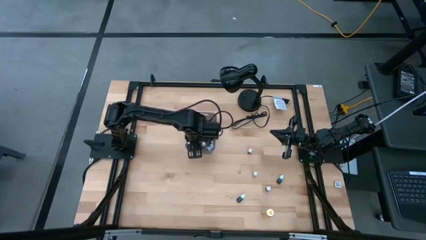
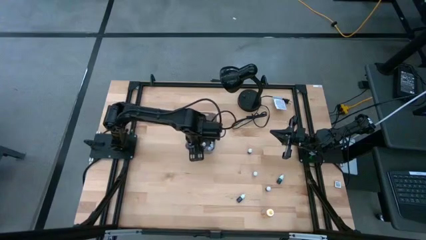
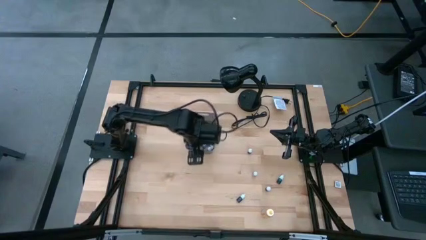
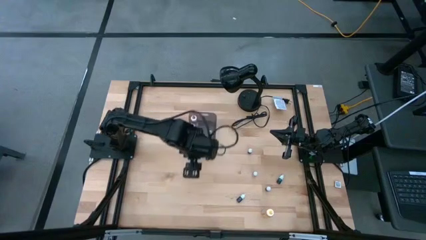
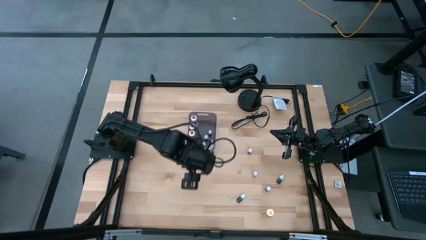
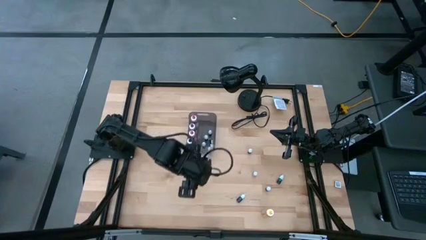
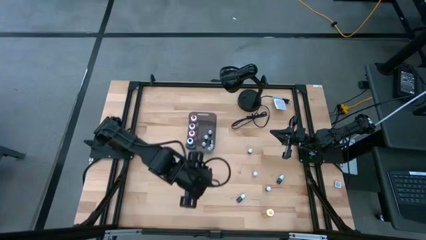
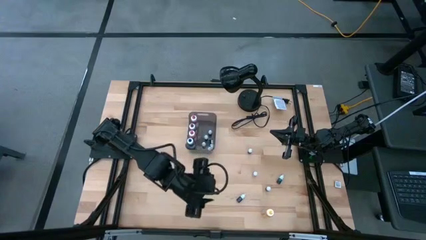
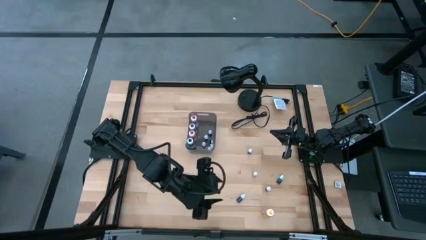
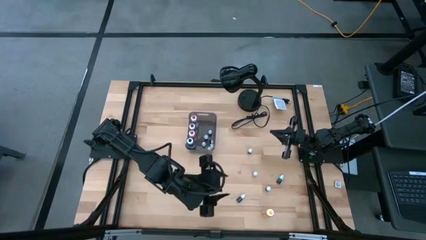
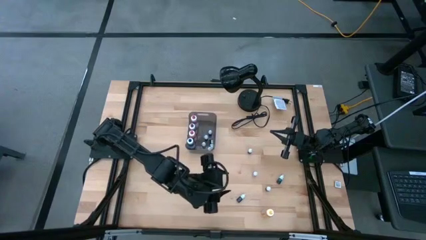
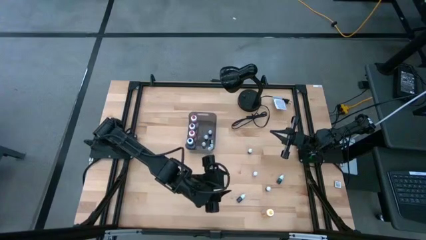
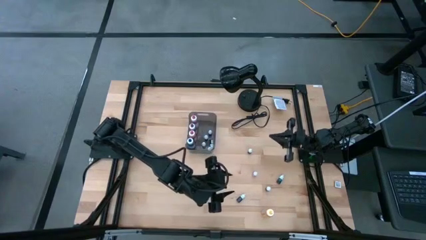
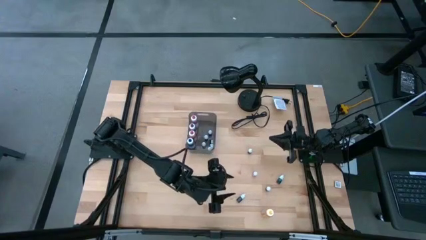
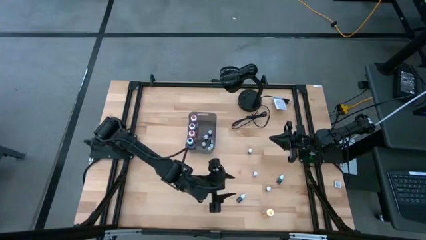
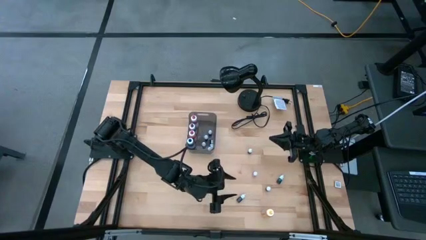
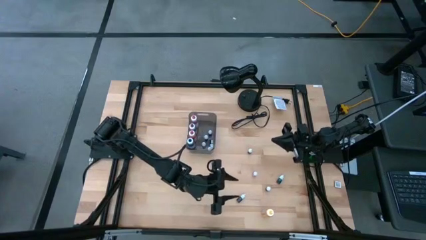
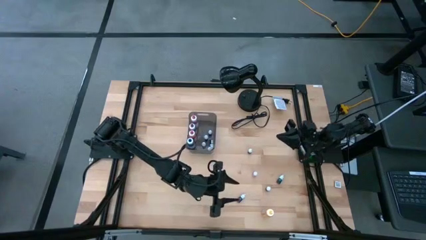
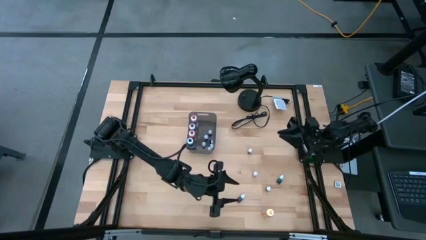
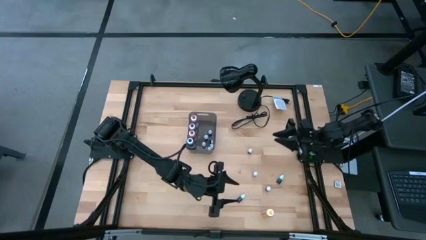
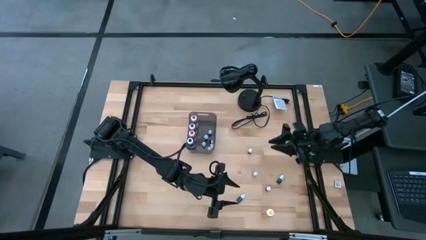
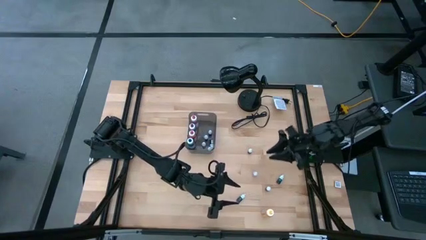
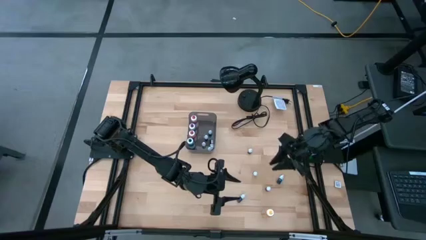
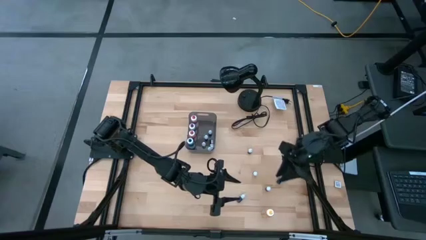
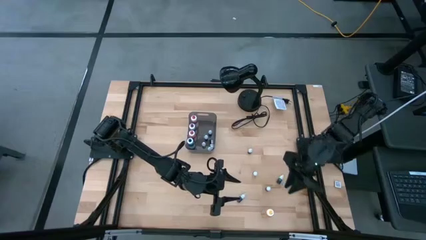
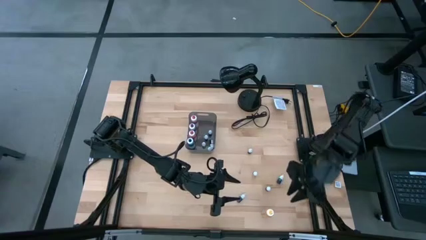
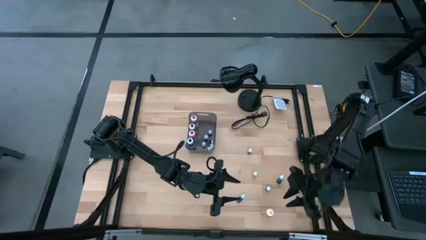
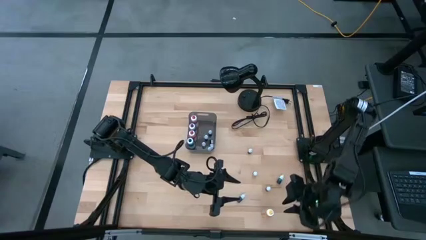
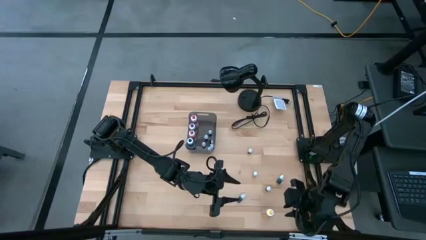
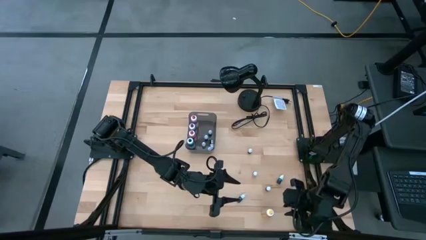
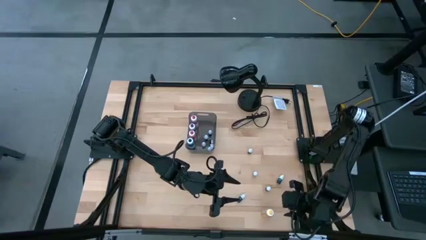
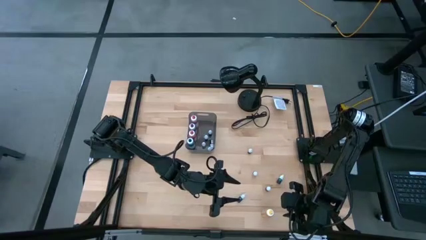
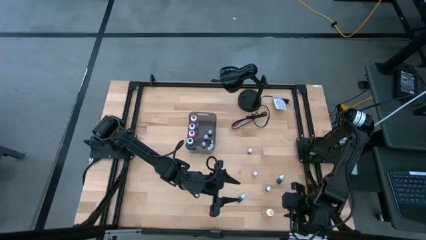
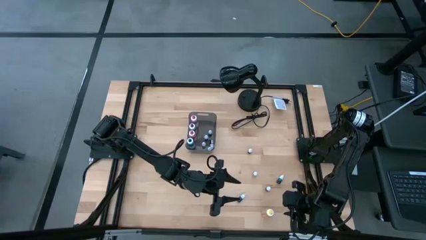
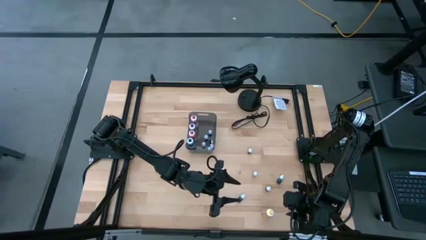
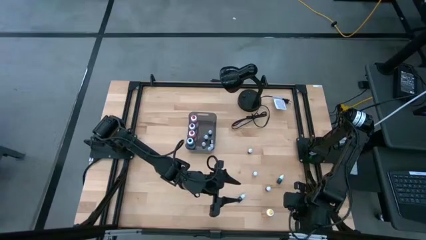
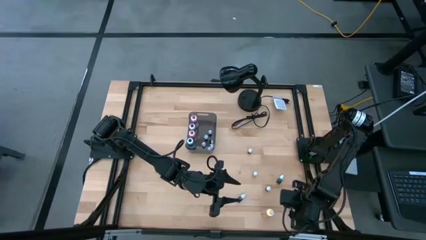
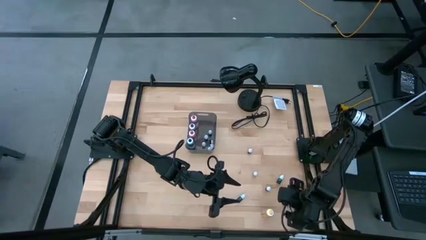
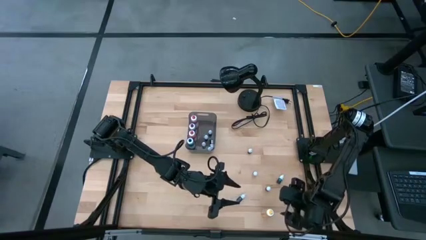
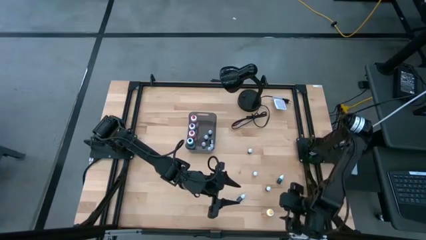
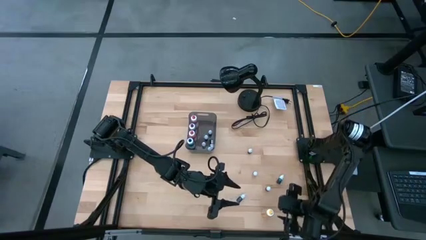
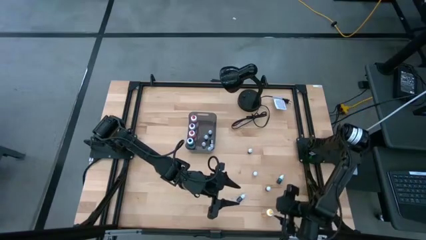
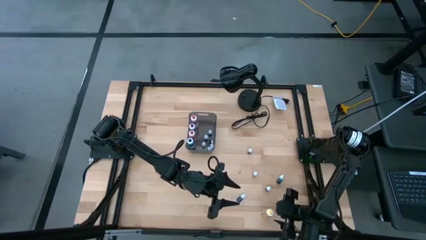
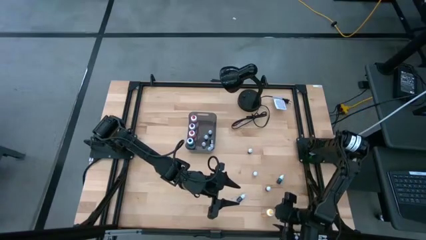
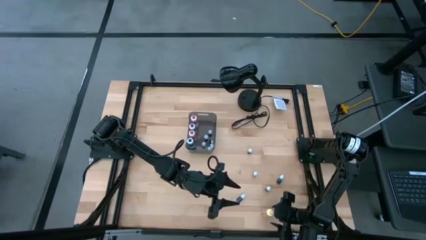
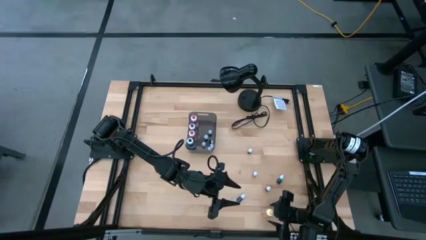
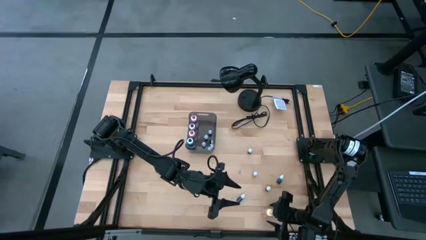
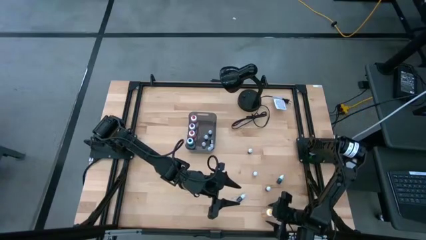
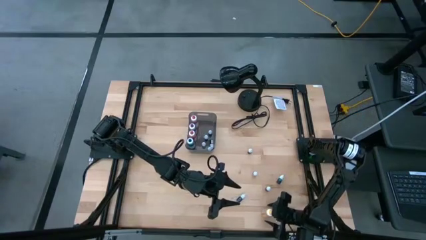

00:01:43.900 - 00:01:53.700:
Task: Pick & Place food coloring
Put the big yellow food coloring bottle into the gray transparent bin

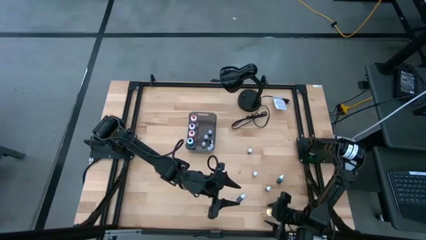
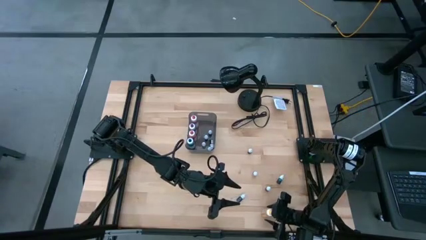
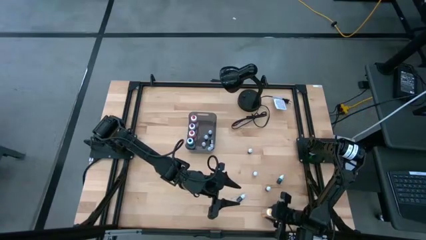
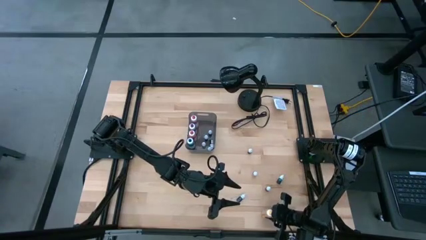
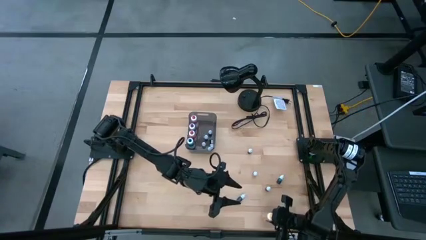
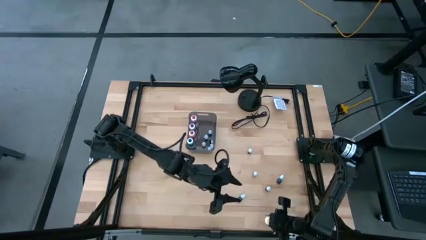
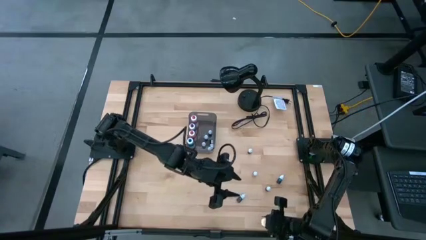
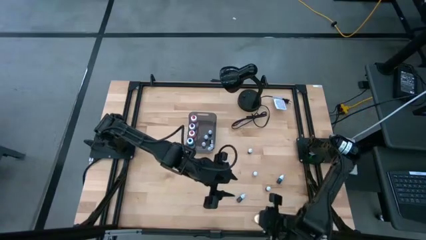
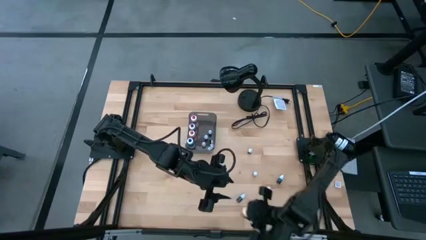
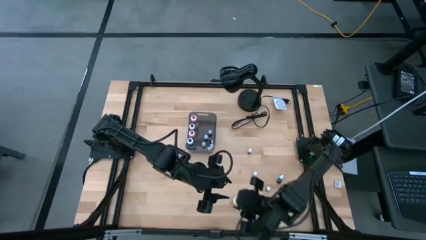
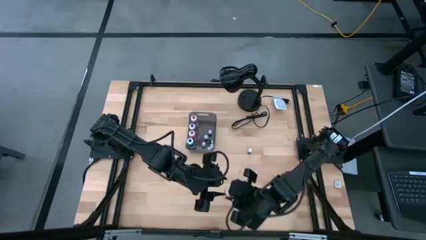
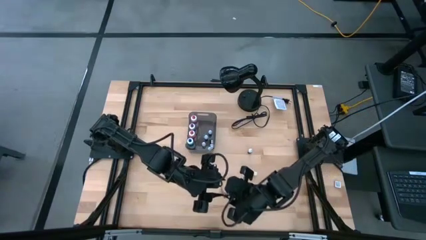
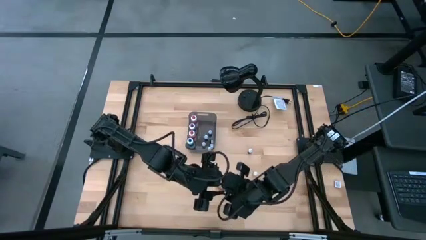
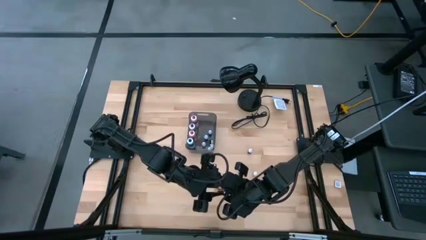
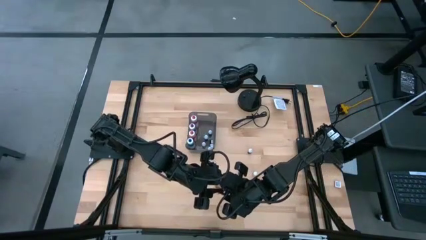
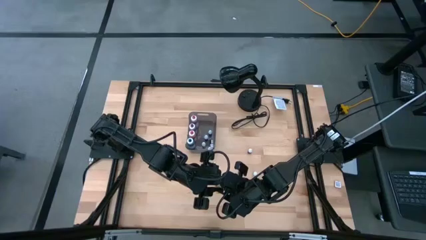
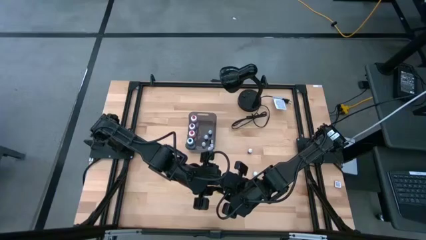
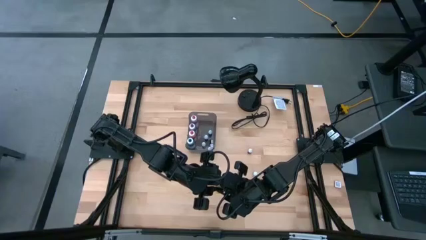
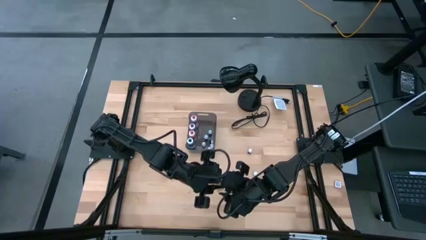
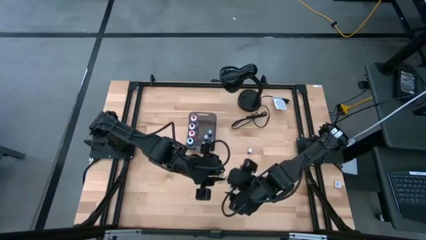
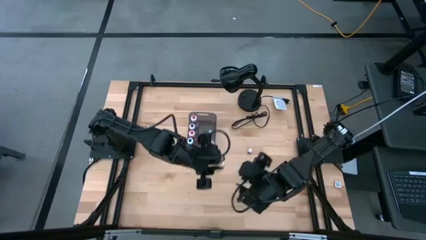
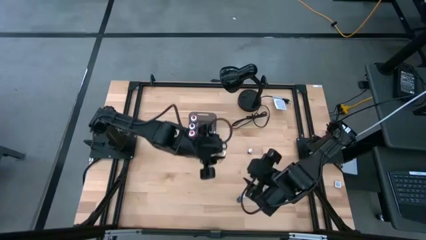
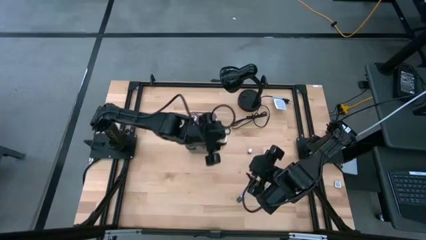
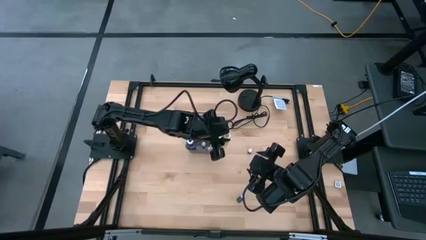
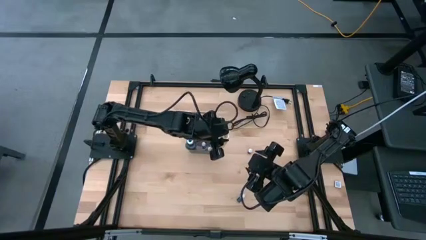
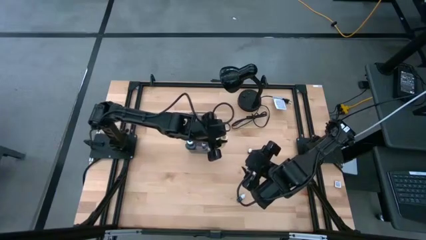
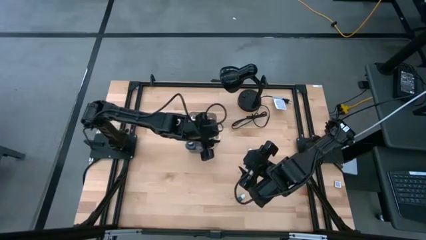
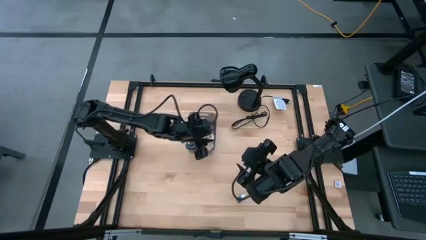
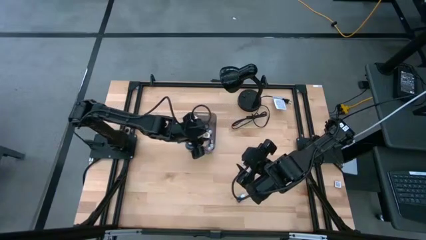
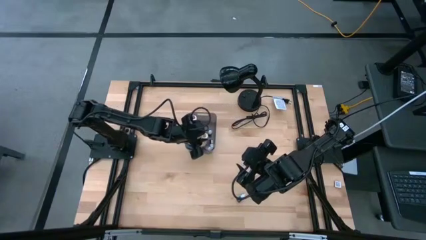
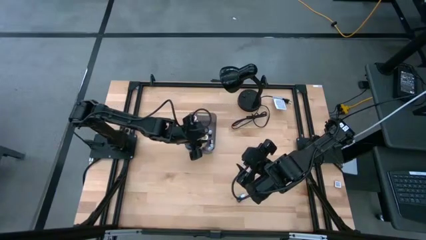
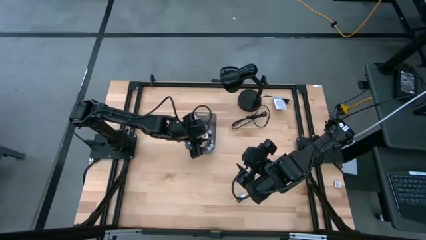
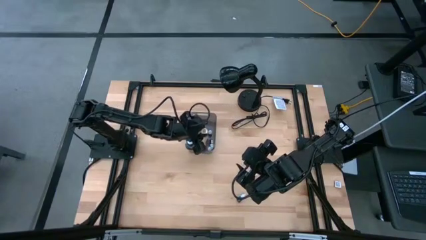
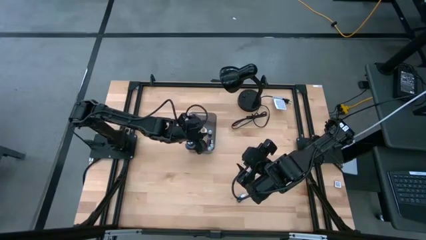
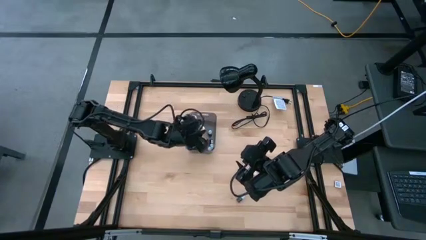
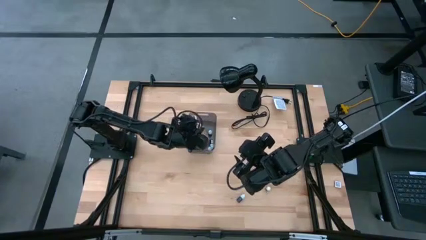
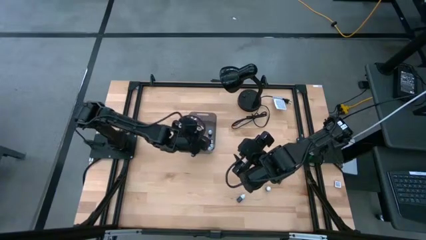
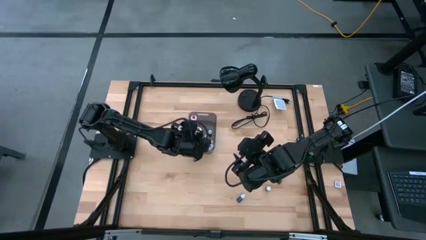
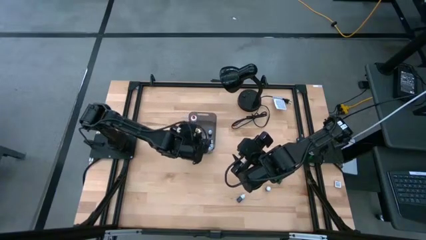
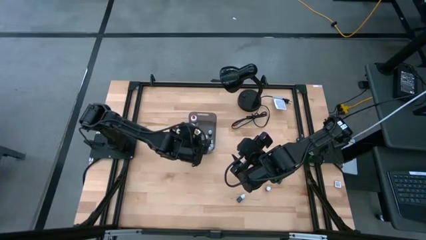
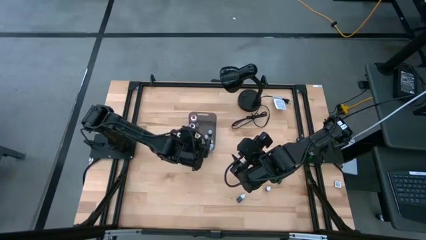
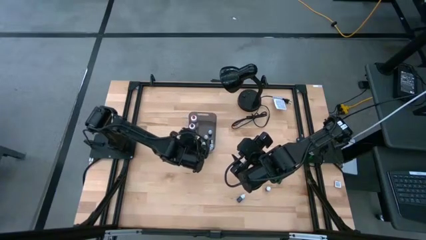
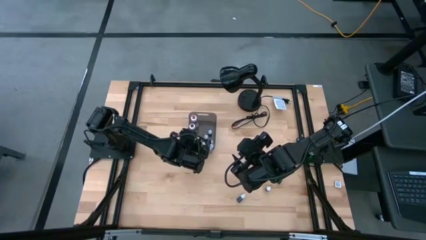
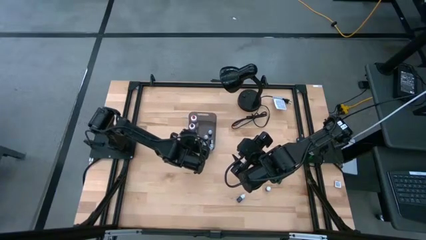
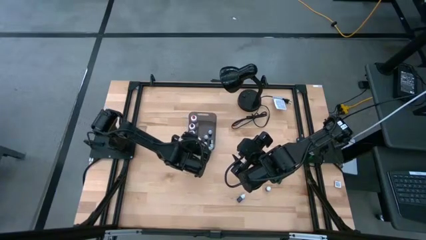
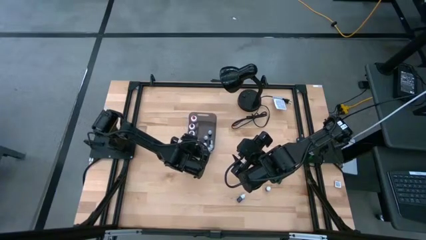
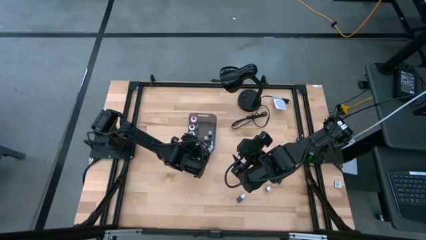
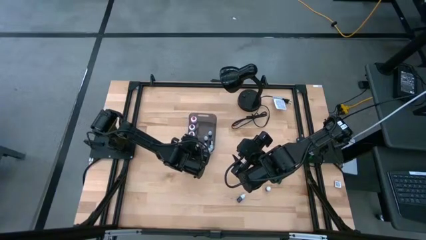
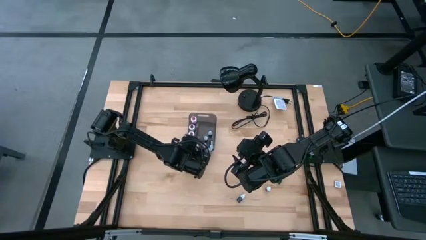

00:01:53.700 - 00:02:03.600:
Put the big yellow food coloring bottle into the gray transparent bin
